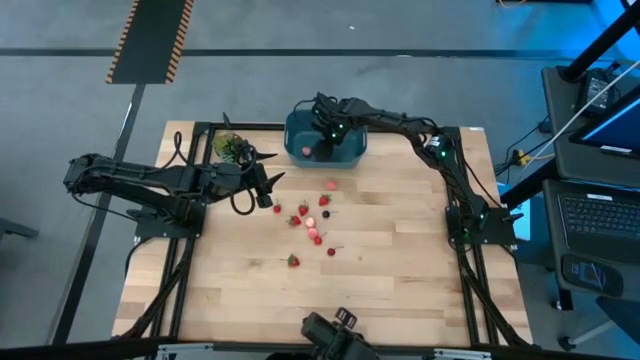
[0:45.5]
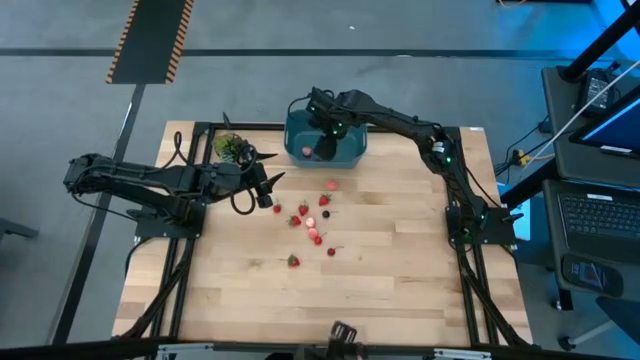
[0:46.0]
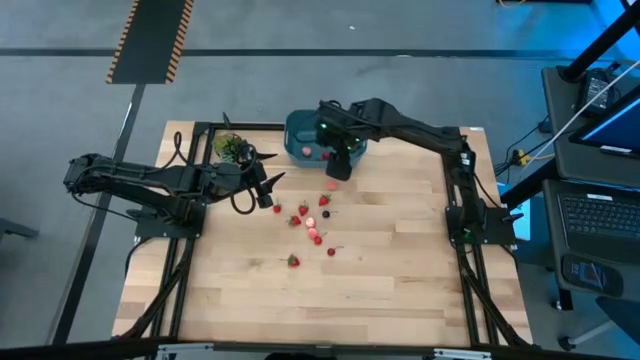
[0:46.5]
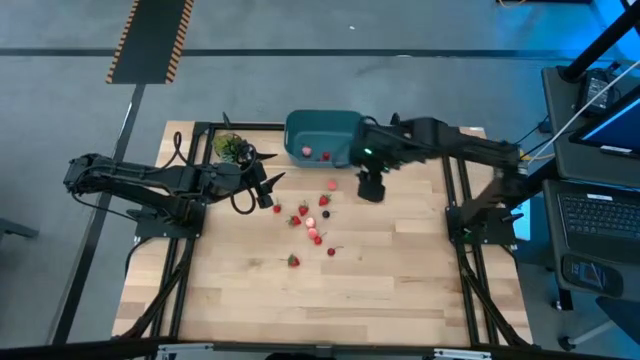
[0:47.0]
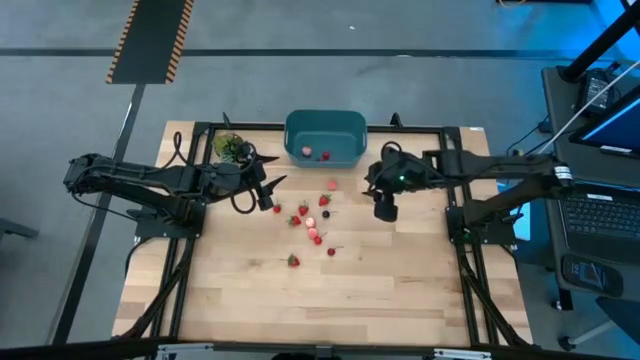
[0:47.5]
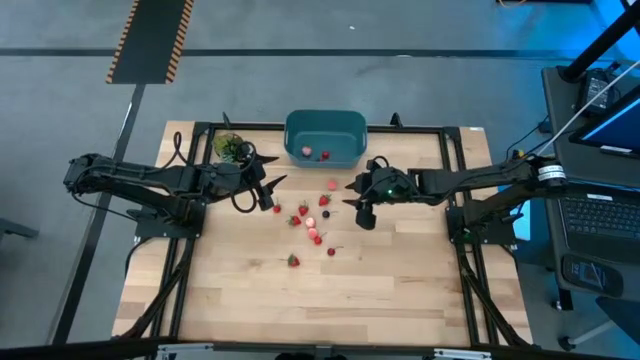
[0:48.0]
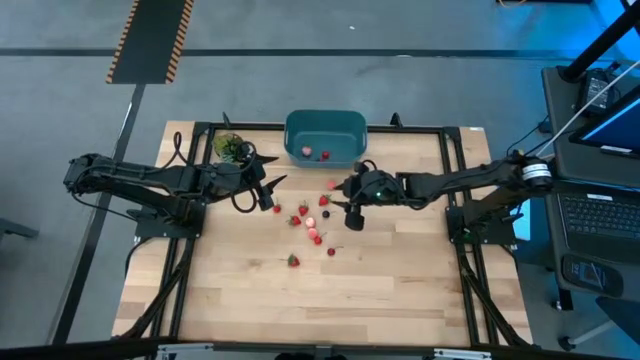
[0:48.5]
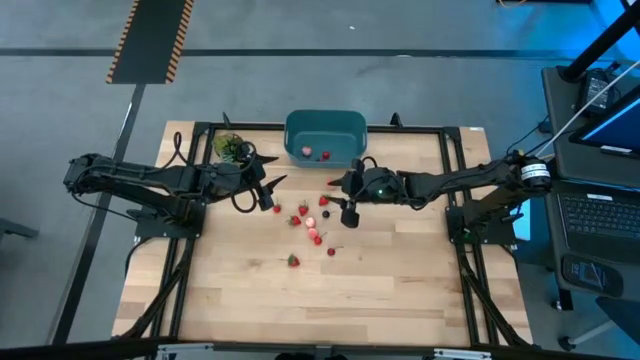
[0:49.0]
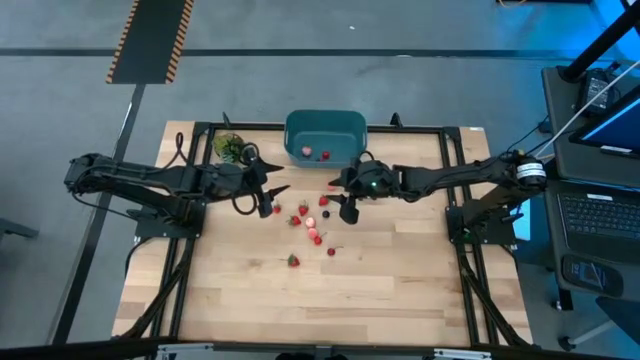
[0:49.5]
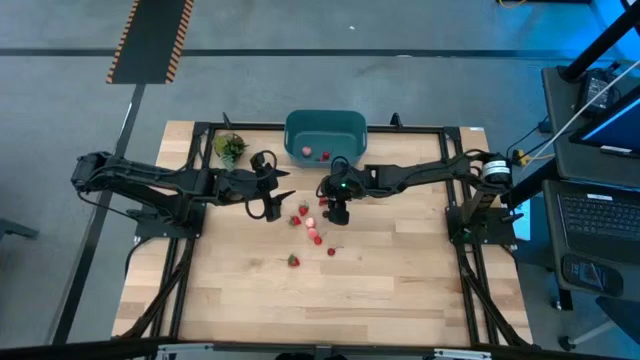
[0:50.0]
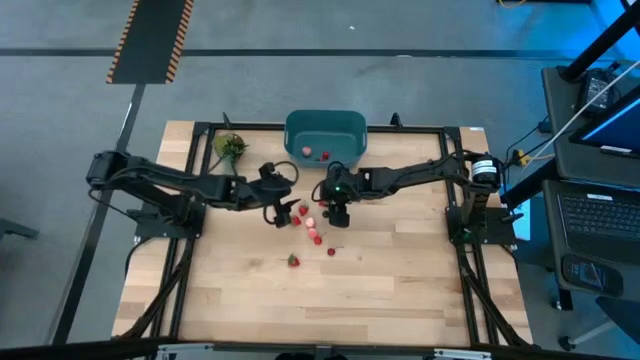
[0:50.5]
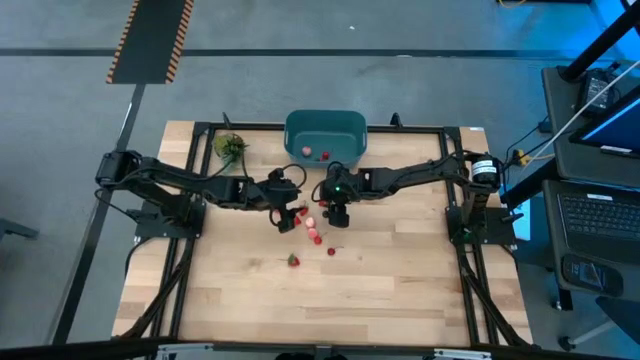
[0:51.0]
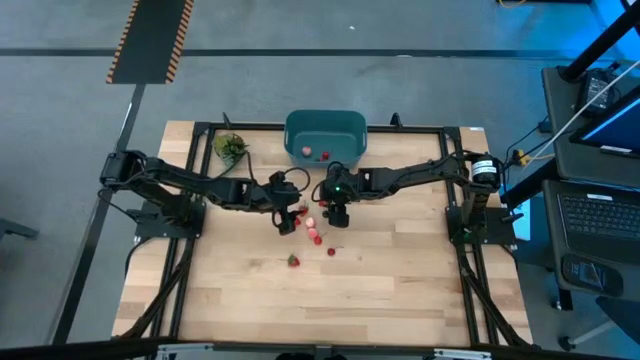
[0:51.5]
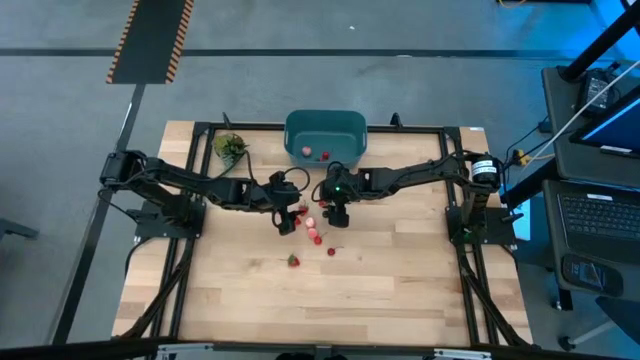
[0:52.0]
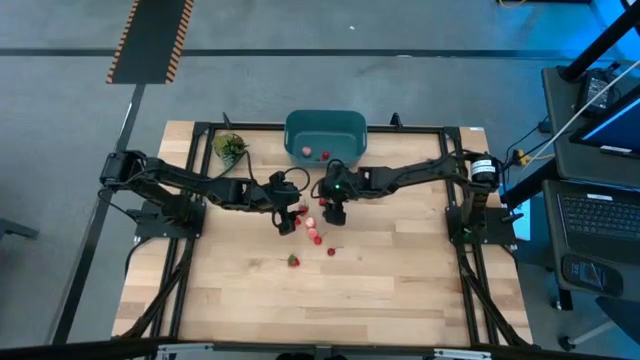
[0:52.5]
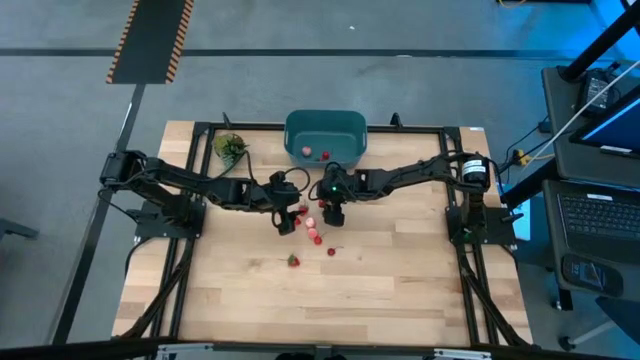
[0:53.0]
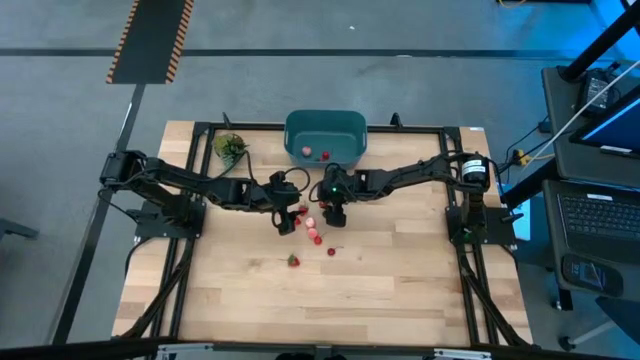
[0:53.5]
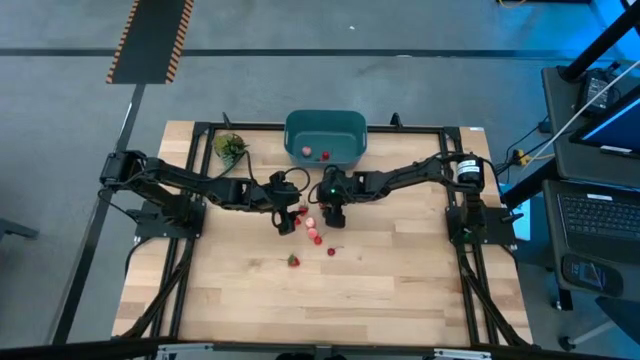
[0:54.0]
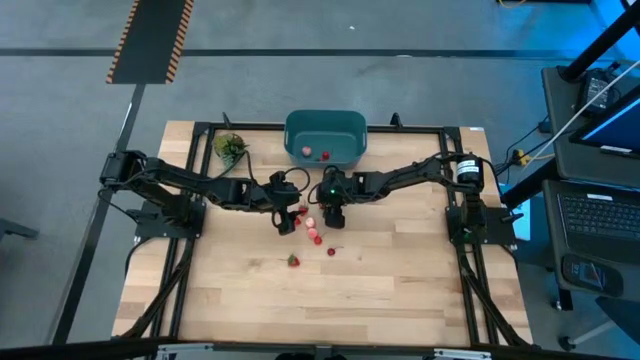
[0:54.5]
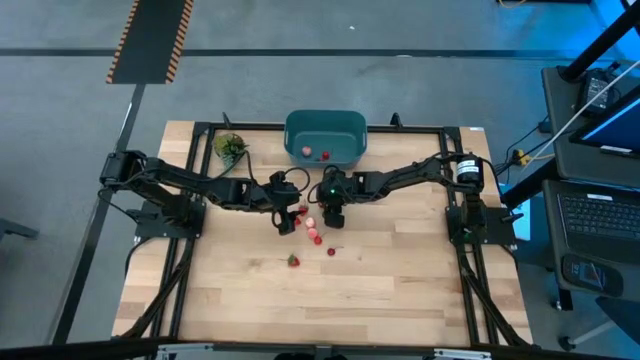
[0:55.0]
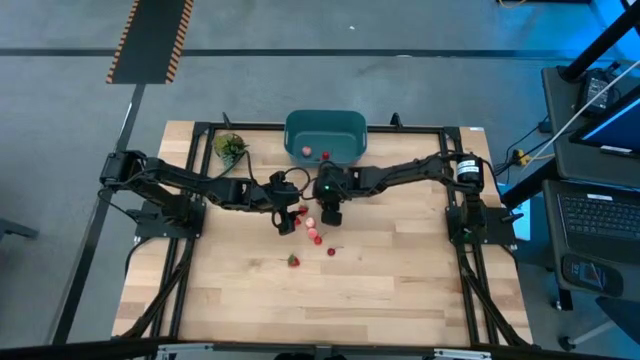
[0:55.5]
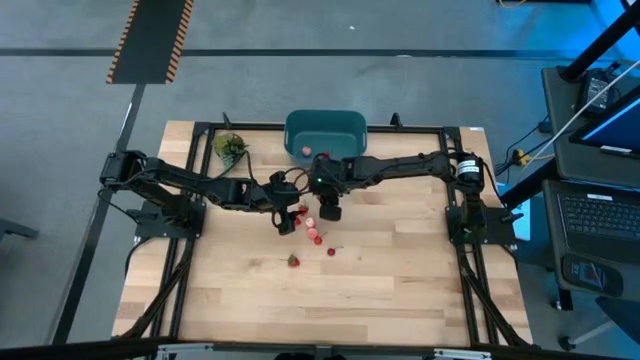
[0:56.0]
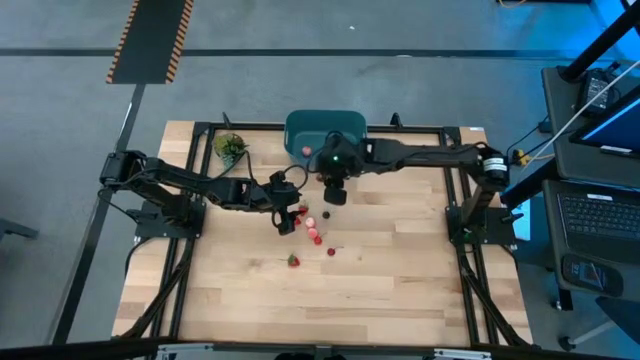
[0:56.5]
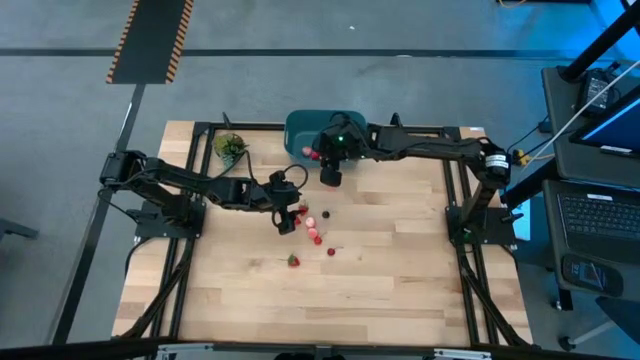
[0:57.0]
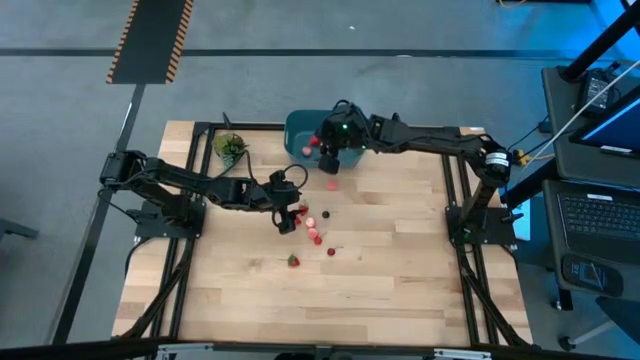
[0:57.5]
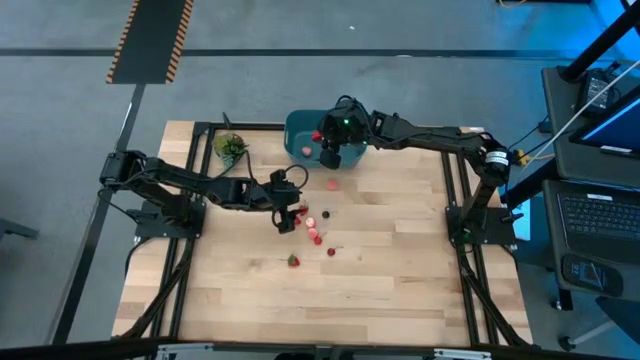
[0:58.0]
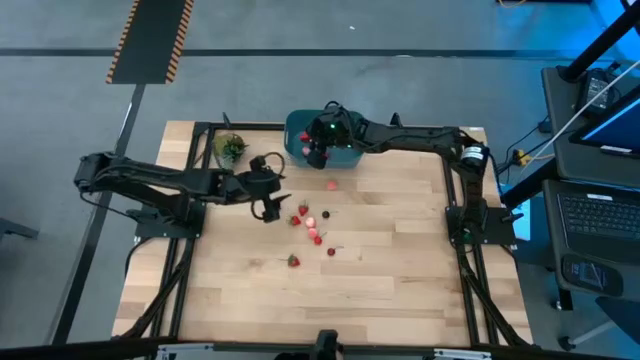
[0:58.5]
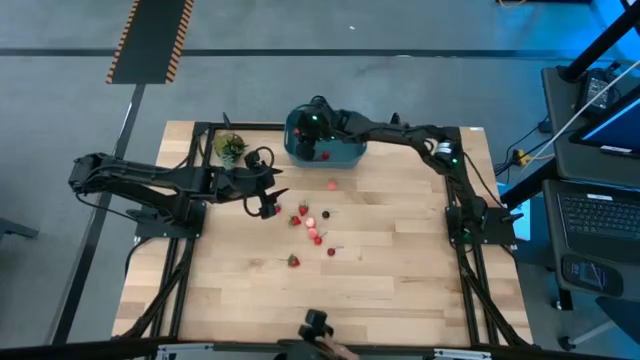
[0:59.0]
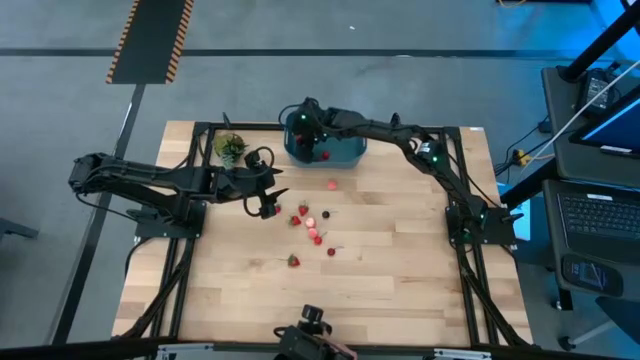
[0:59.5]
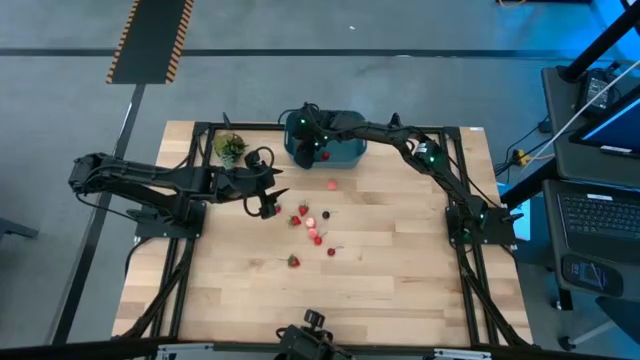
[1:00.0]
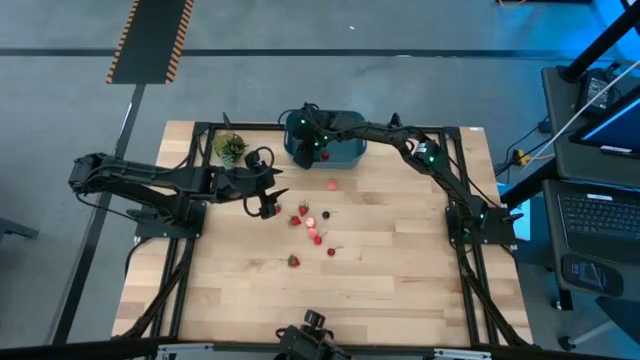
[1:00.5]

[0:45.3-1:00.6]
Task: Pick and placing Produce into tupperware
Put the strawberry into the blue bin

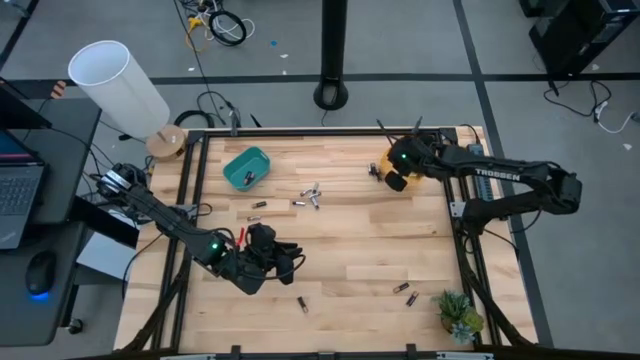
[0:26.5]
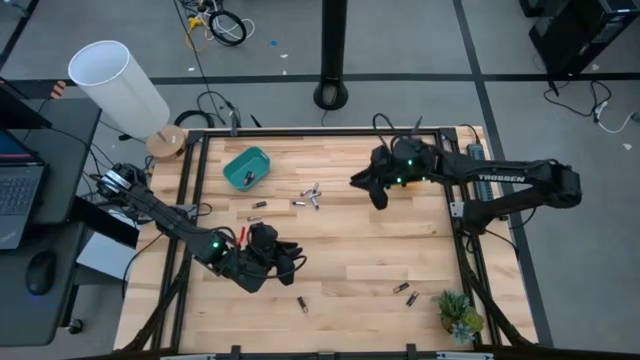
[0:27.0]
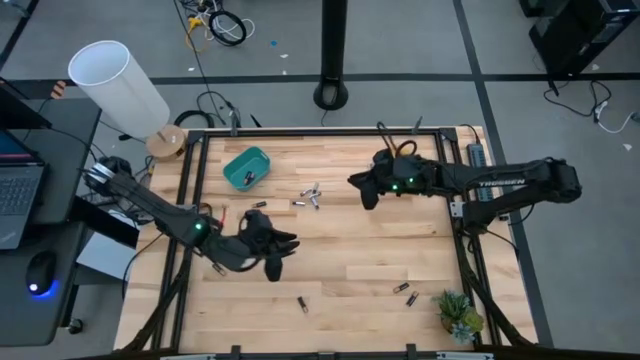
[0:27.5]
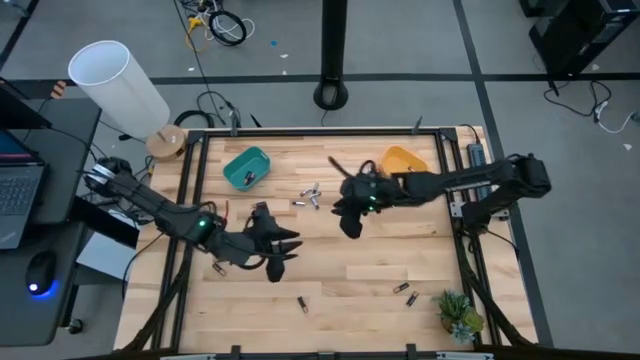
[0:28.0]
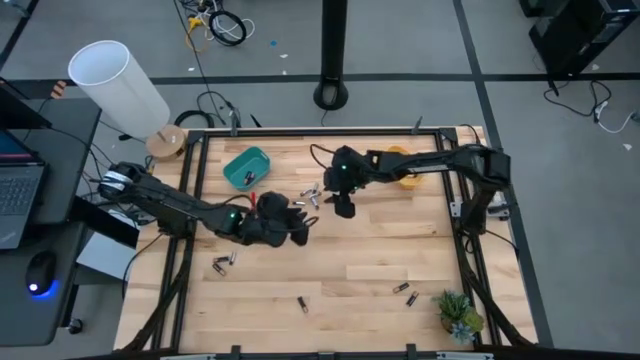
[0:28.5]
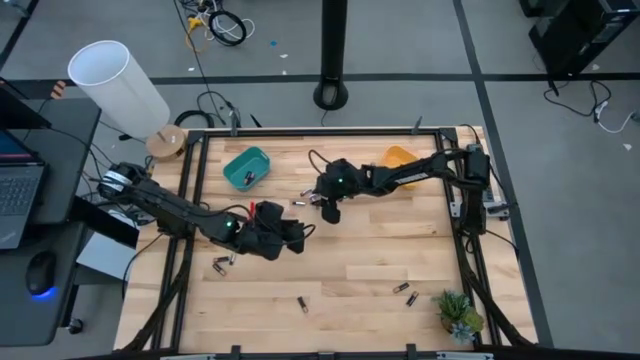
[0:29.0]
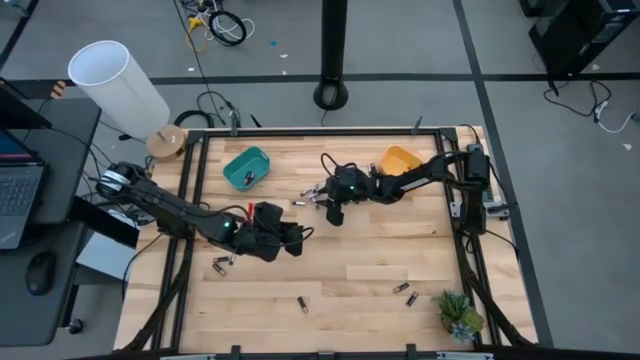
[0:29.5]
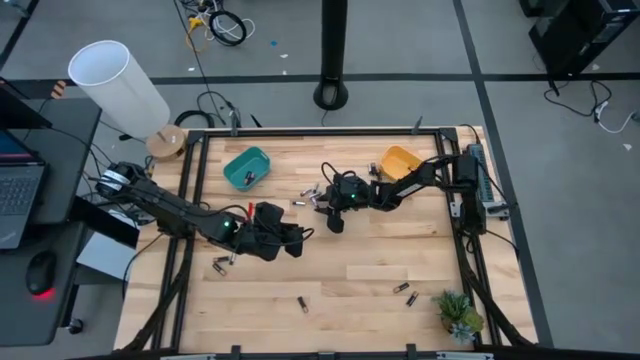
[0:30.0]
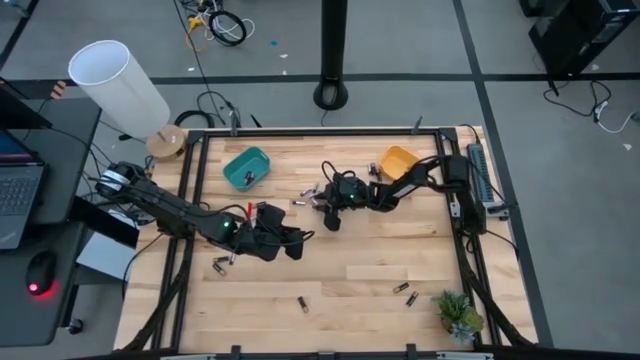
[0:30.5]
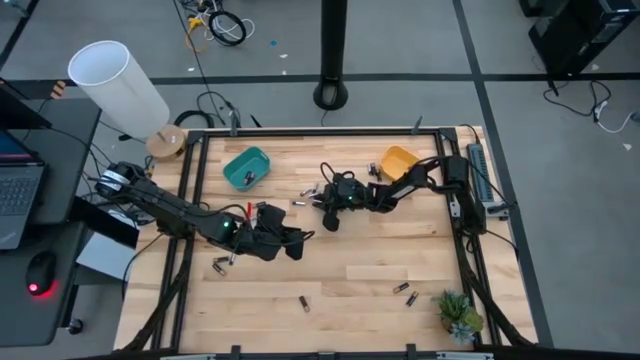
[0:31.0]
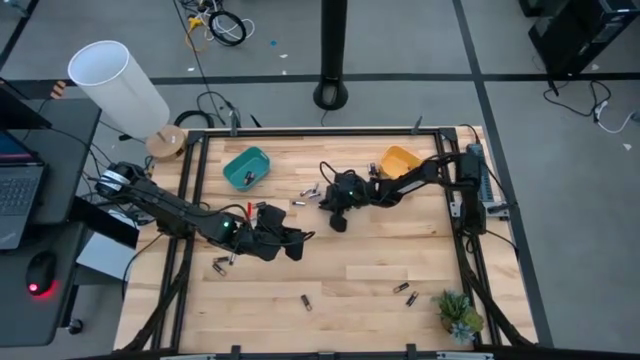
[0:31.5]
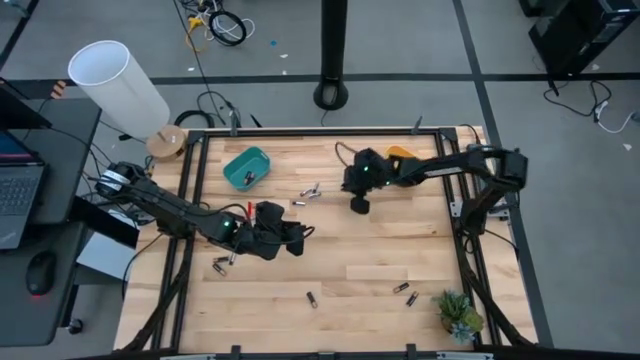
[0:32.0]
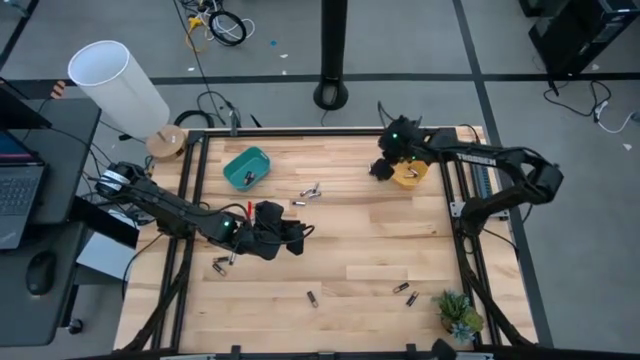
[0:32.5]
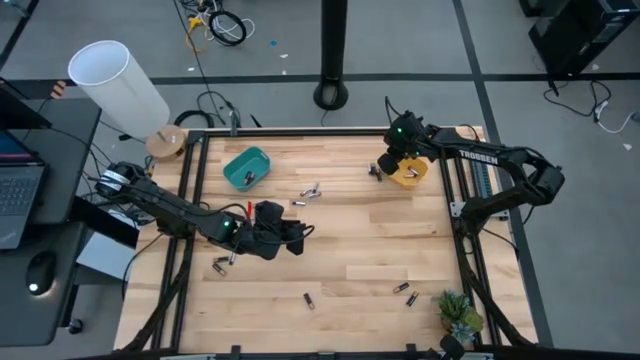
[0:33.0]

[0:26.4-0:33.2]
Task: Sort batteries
Put the silver battery into the yellow bin
